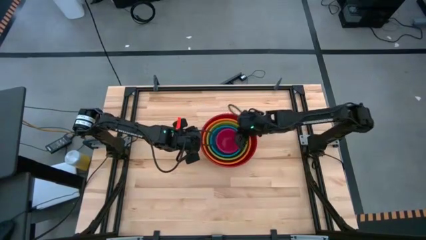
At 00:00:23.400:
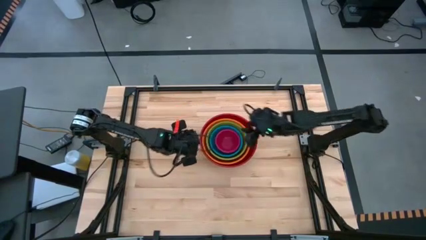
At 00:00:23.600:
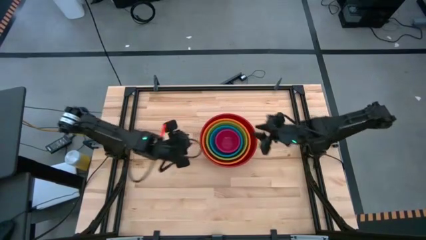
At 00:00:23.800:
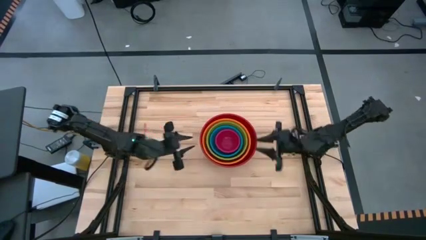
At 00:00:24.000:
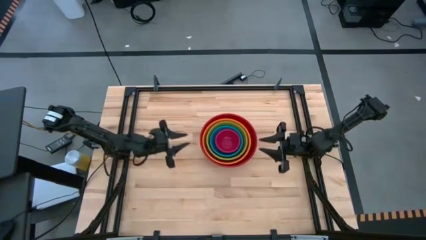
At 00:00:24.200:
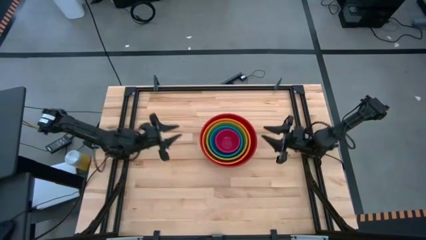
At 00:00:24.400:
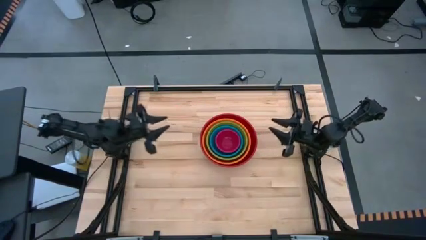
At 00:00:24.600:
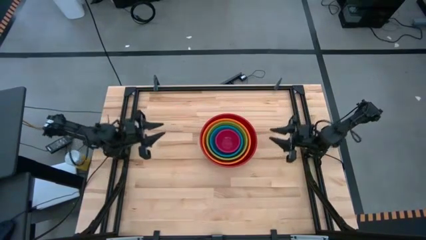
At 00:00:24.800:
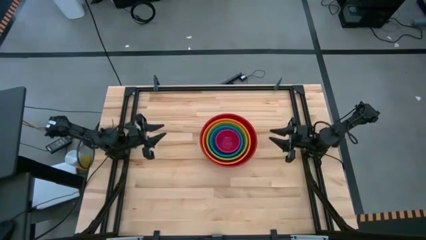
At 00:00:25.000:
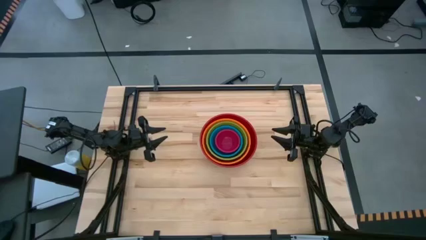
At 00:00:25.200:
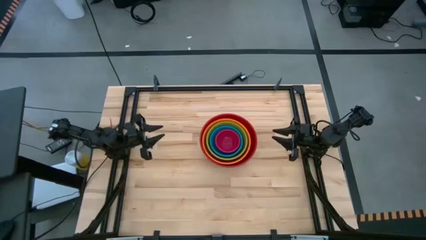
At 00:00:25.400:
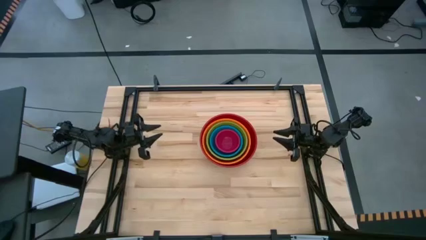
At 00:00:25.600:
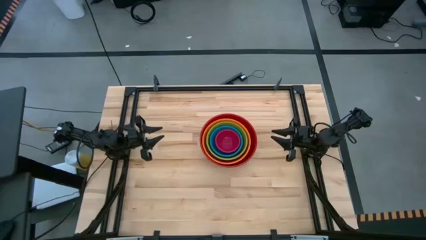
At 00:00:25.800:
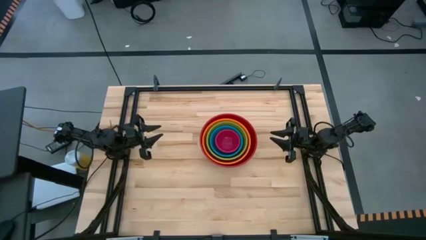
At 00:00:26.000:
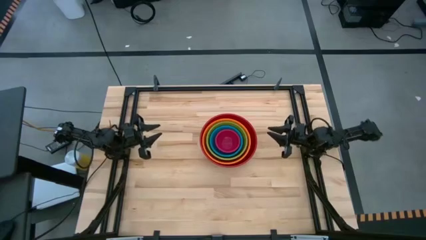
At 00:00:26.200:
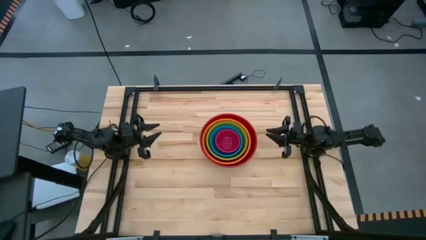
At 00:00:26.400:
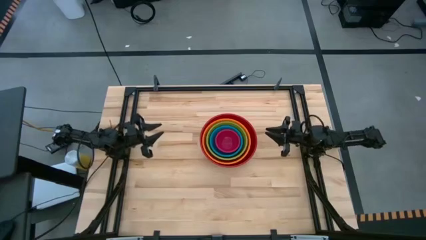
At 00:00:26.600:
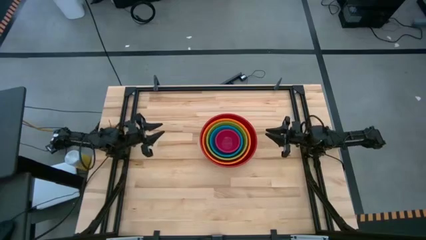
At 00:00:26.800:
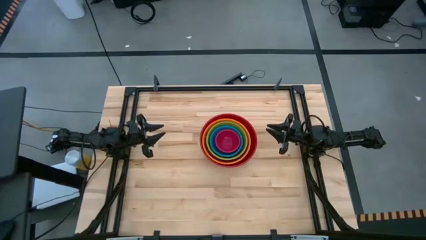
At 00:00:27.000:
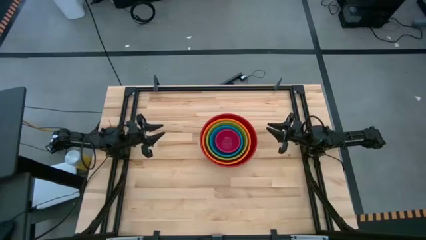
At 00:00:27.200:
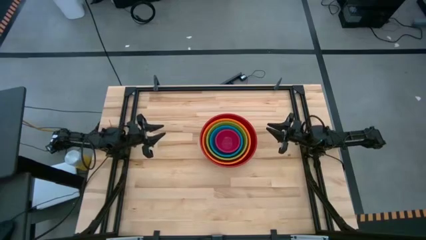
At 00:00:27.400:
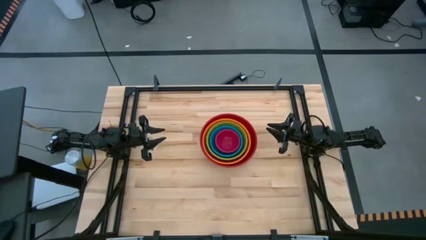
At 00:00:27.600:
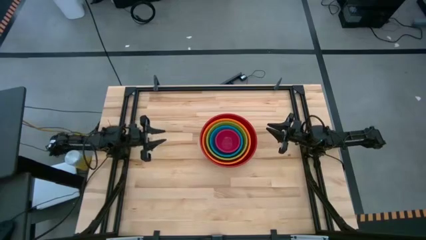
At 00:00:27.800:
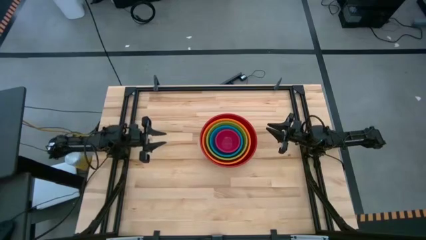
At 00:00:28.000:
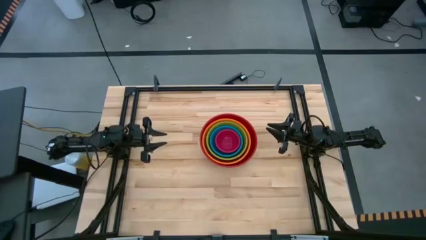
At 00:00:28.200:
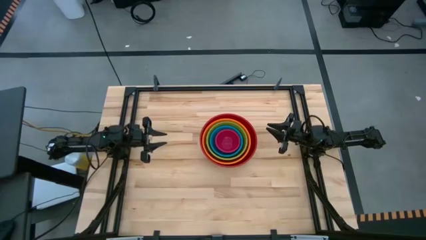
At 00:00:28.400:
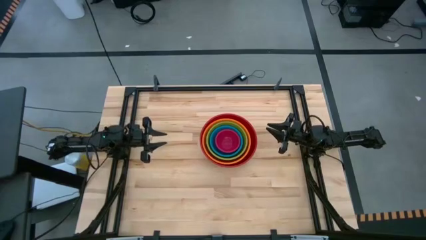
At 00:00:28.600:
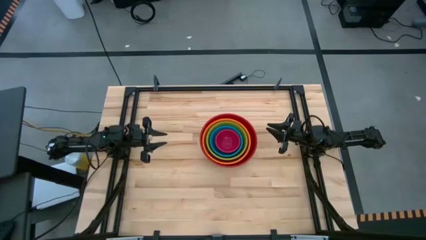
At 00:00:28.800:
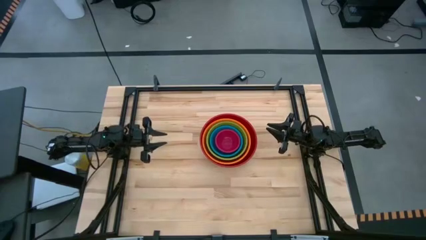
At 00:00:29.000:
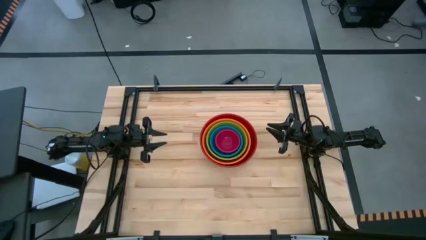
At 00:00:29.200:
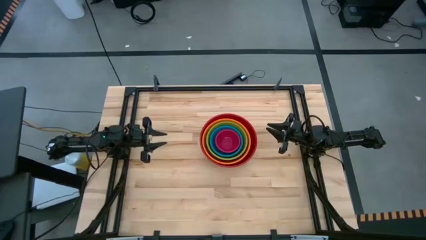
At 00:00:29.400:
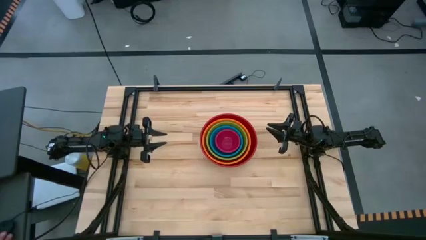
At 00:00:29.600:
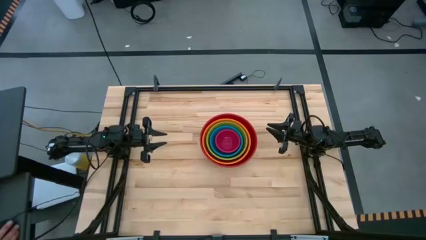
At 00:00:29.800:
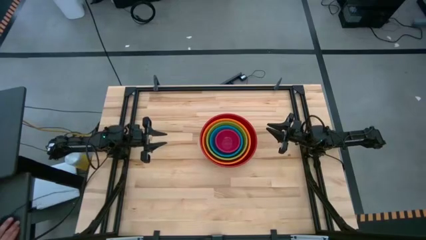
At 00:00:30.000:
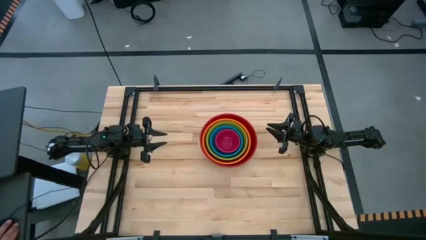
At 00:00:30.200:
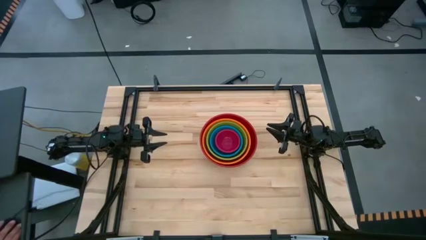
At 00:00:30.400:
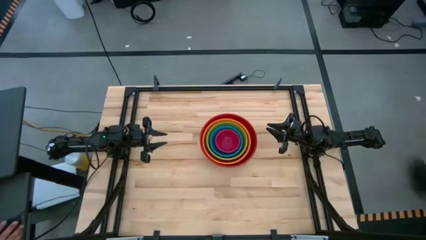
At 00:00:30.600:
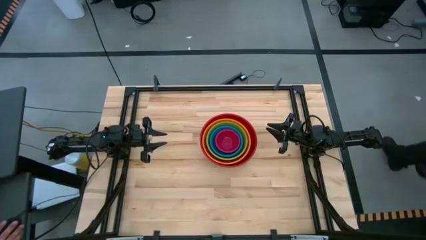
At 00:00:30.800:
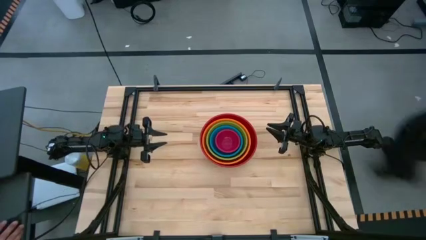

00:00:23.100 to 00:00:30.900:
Return to Home Position
